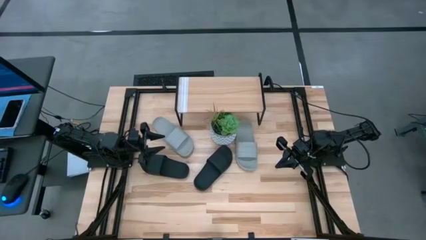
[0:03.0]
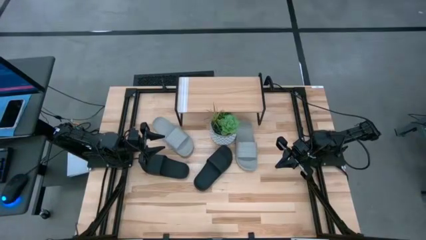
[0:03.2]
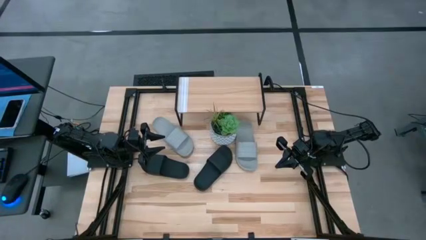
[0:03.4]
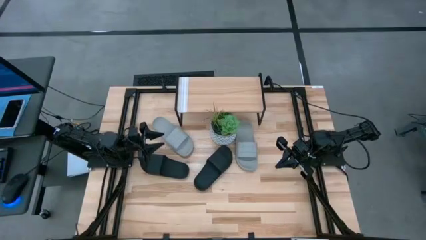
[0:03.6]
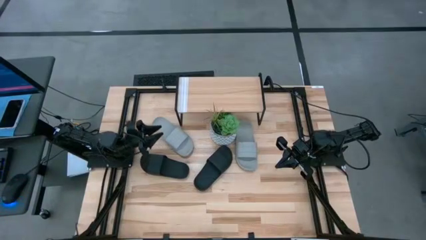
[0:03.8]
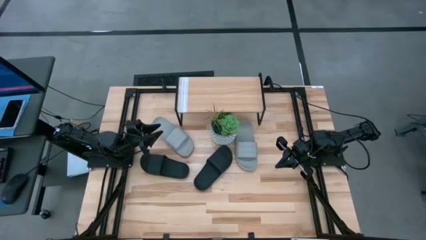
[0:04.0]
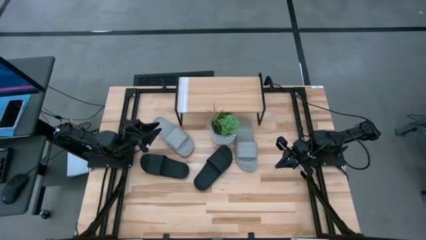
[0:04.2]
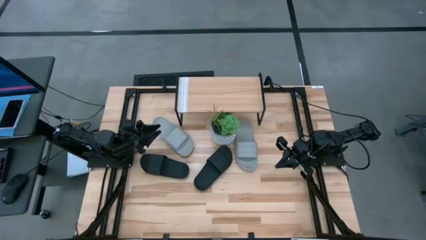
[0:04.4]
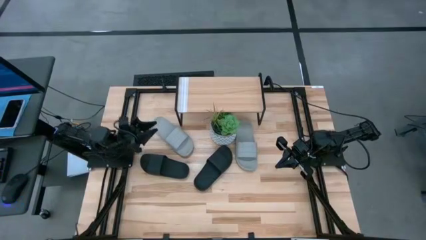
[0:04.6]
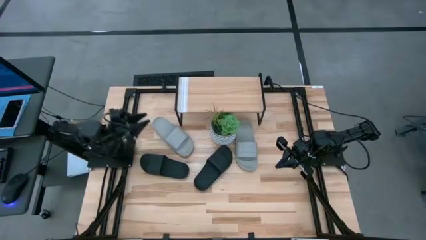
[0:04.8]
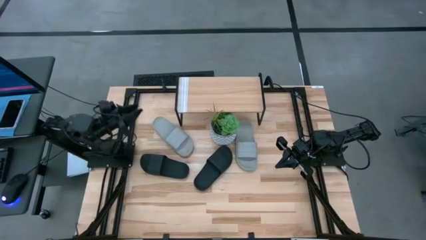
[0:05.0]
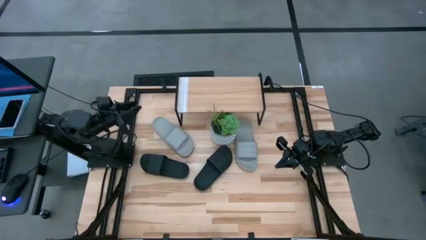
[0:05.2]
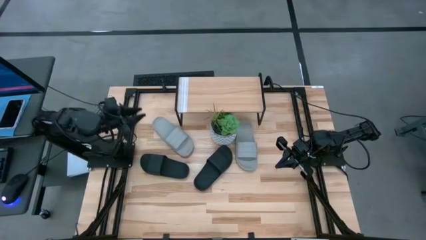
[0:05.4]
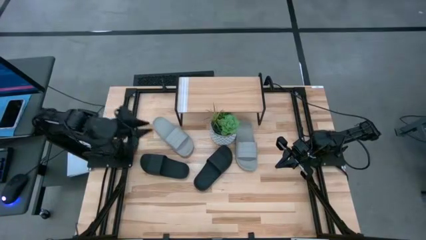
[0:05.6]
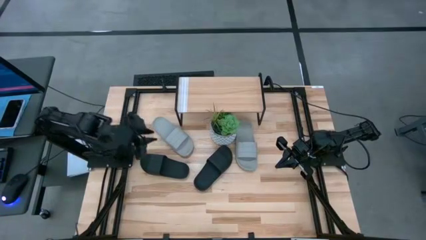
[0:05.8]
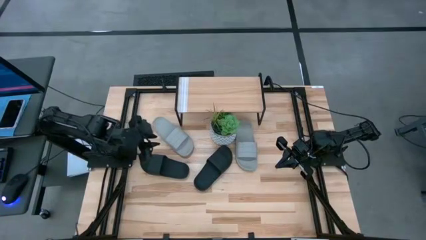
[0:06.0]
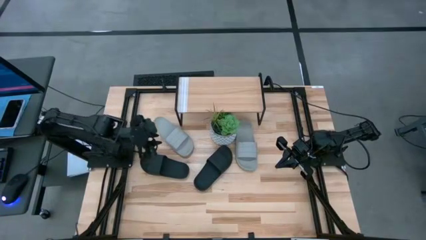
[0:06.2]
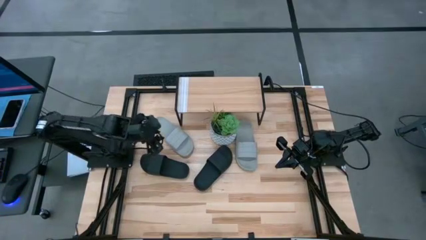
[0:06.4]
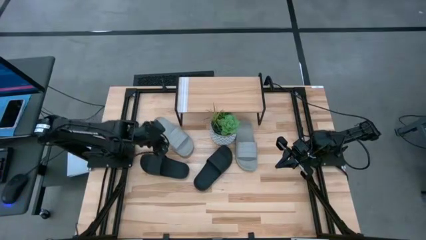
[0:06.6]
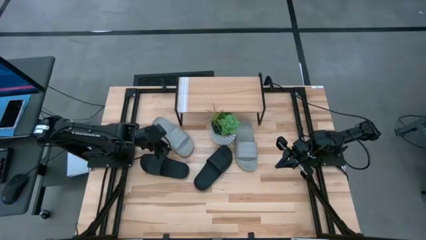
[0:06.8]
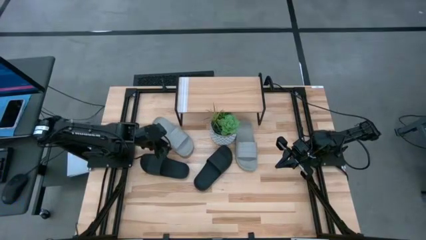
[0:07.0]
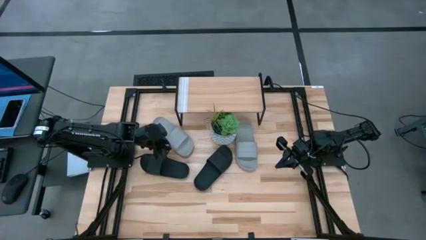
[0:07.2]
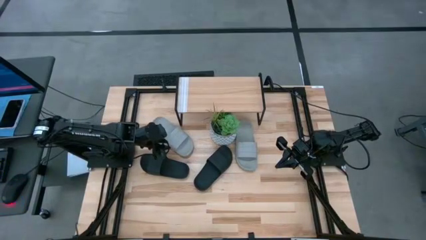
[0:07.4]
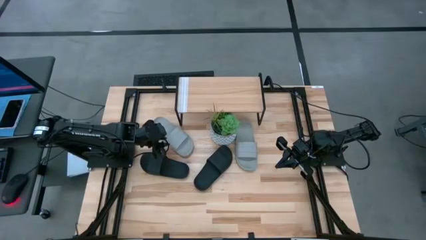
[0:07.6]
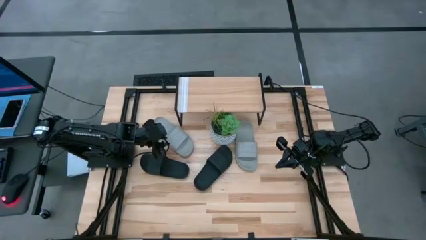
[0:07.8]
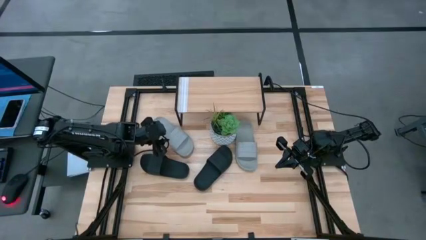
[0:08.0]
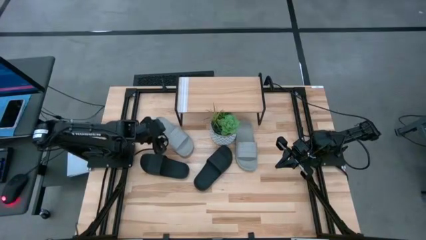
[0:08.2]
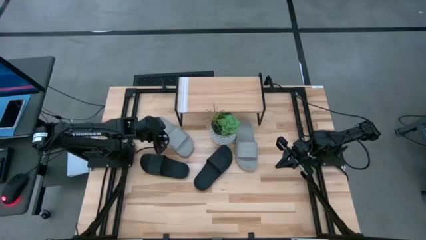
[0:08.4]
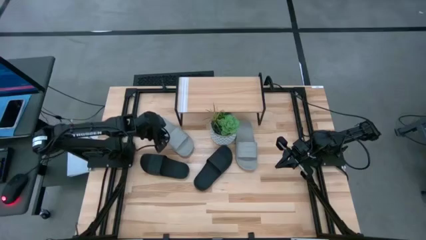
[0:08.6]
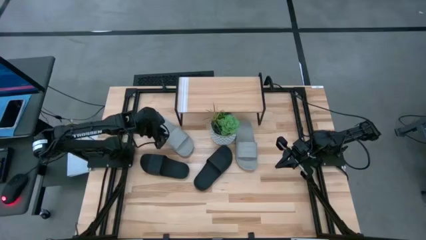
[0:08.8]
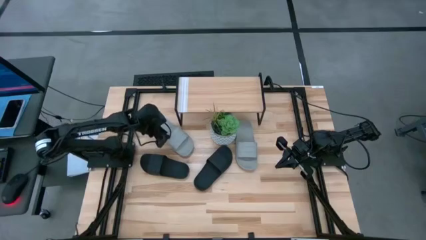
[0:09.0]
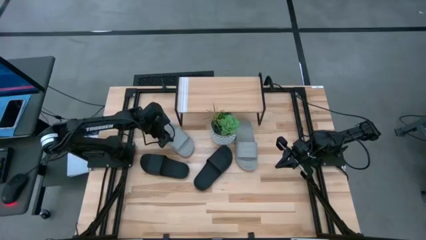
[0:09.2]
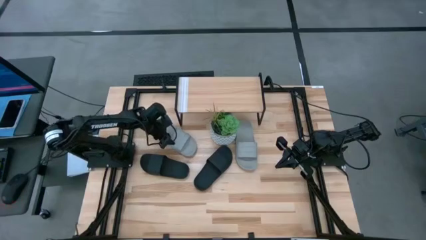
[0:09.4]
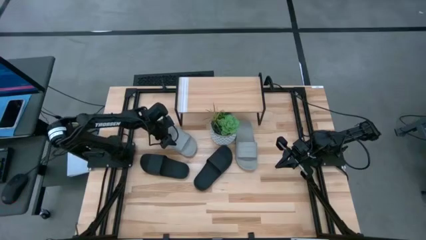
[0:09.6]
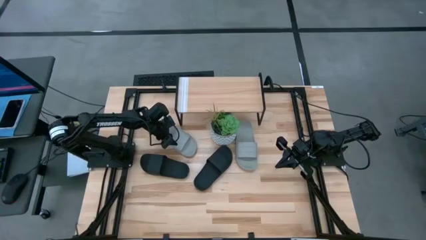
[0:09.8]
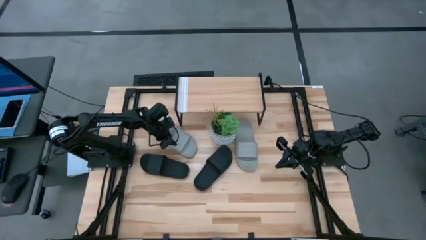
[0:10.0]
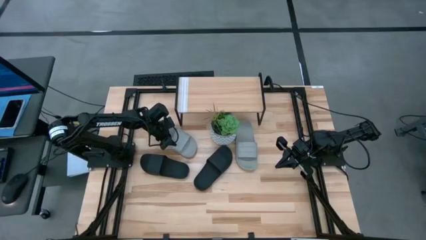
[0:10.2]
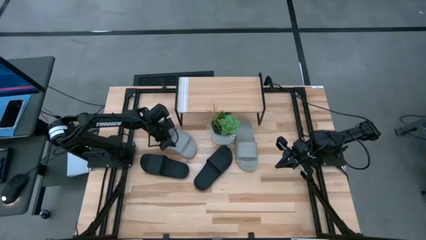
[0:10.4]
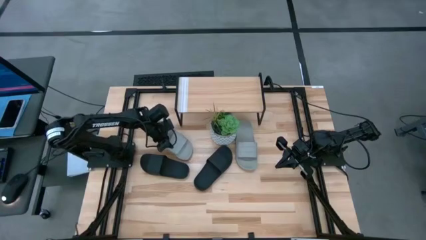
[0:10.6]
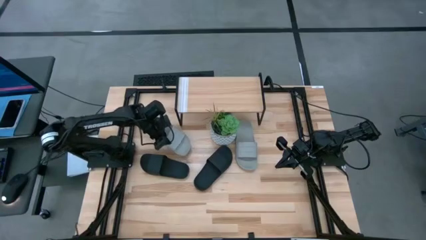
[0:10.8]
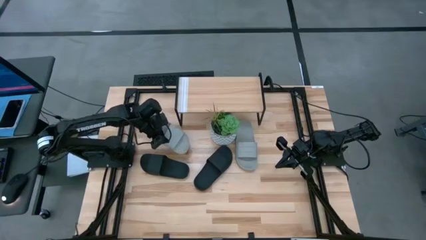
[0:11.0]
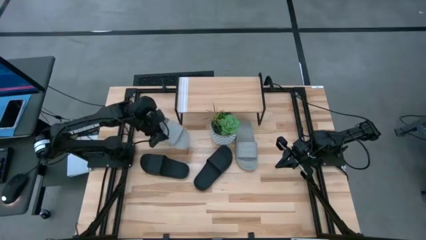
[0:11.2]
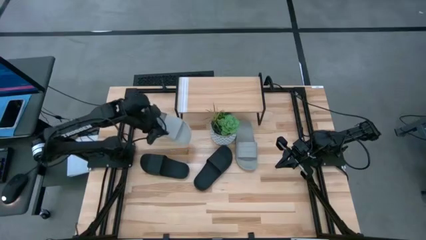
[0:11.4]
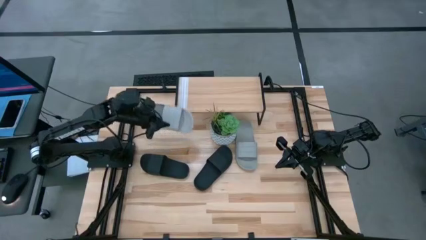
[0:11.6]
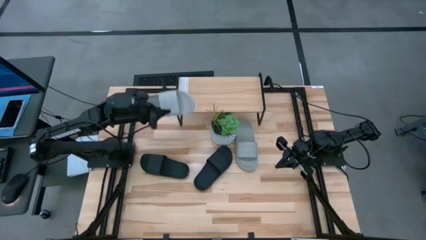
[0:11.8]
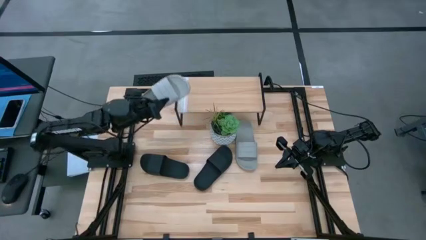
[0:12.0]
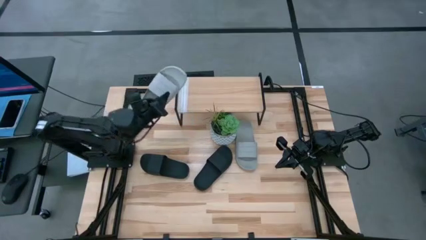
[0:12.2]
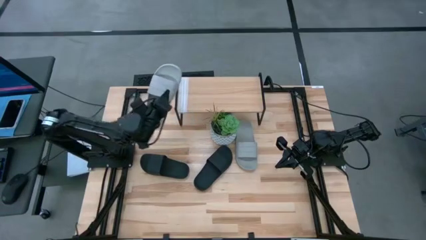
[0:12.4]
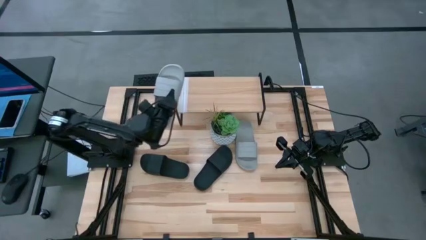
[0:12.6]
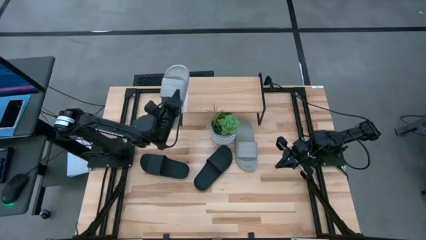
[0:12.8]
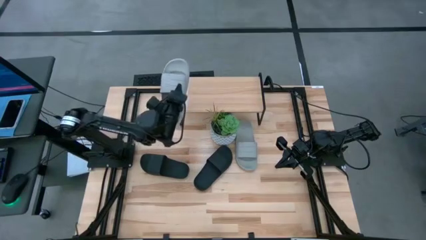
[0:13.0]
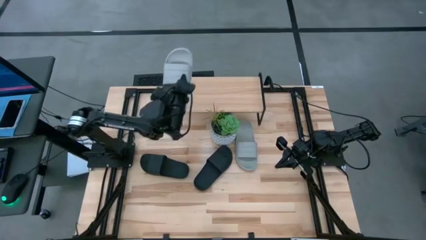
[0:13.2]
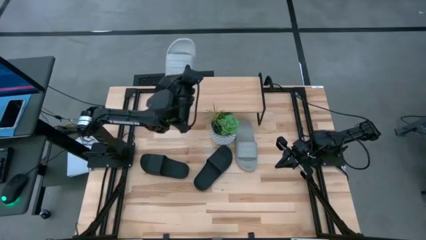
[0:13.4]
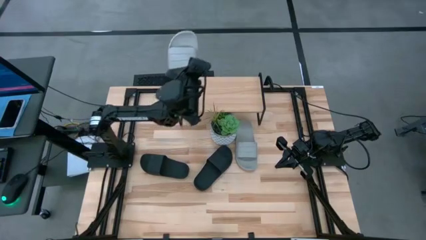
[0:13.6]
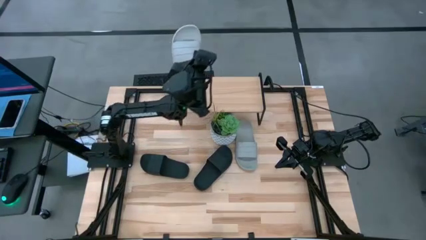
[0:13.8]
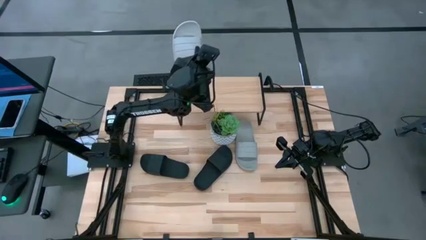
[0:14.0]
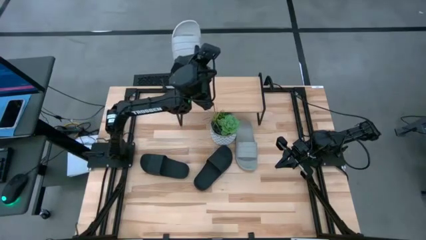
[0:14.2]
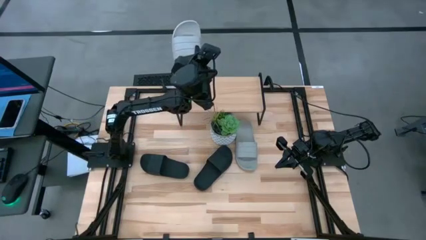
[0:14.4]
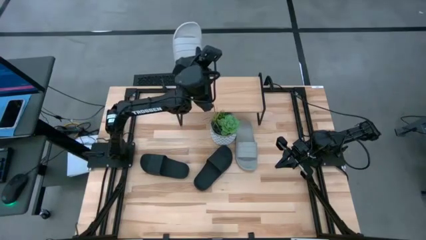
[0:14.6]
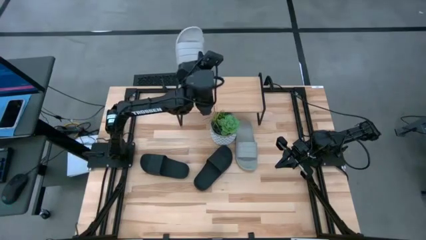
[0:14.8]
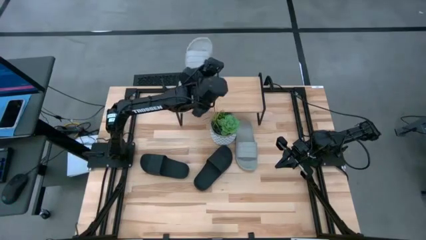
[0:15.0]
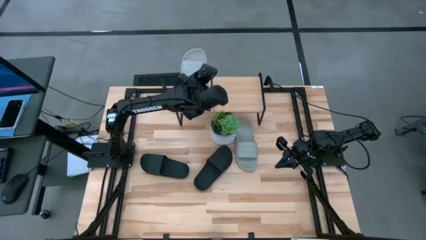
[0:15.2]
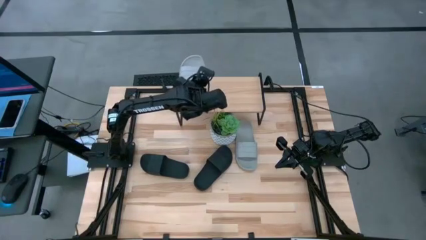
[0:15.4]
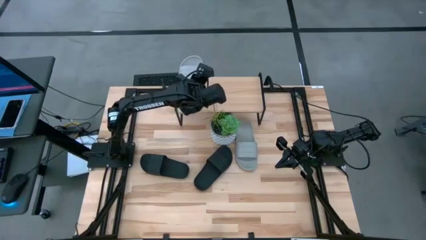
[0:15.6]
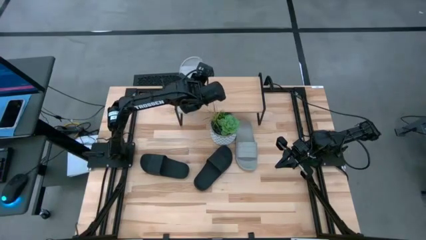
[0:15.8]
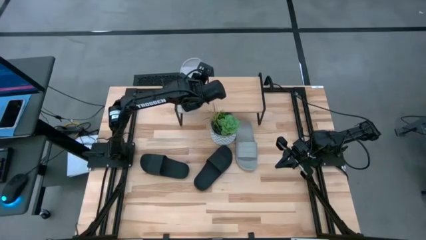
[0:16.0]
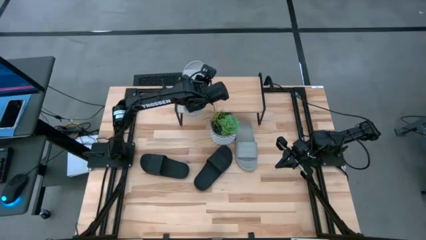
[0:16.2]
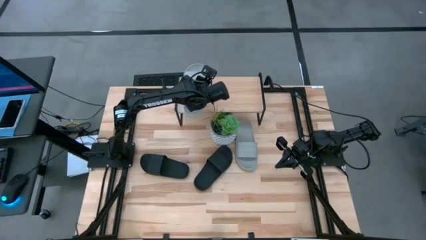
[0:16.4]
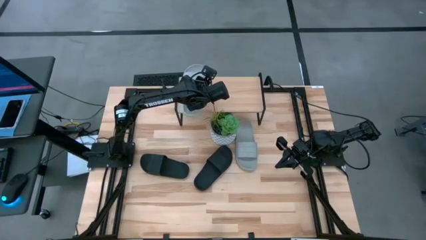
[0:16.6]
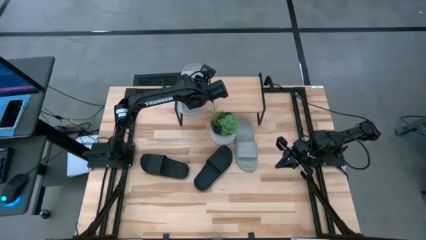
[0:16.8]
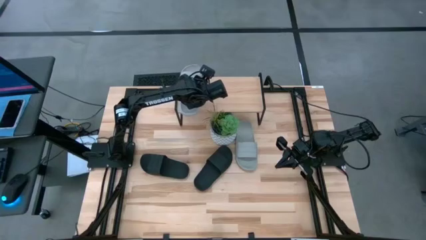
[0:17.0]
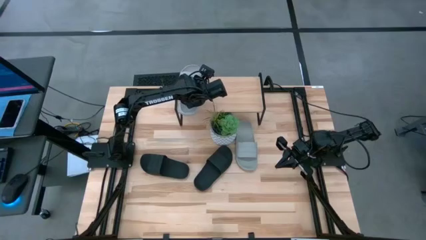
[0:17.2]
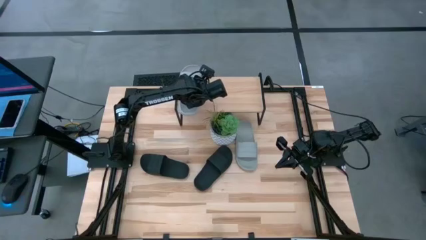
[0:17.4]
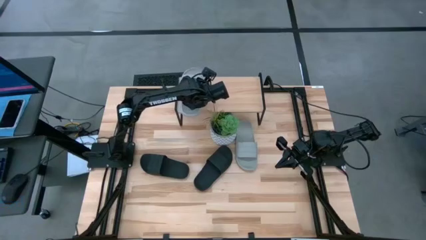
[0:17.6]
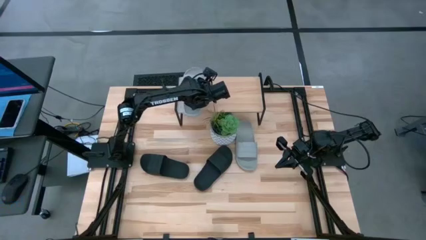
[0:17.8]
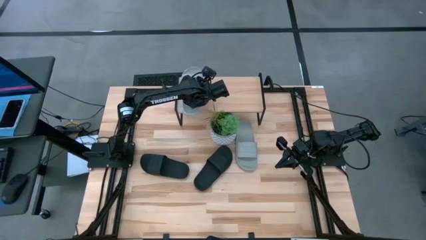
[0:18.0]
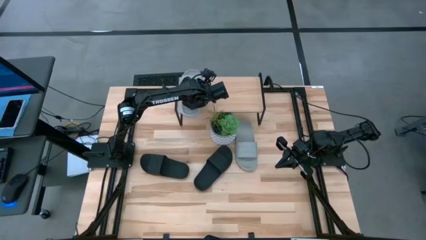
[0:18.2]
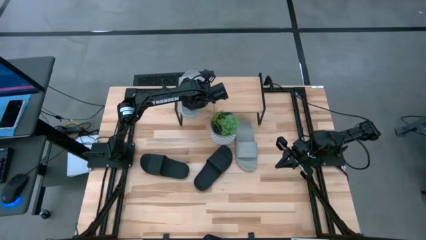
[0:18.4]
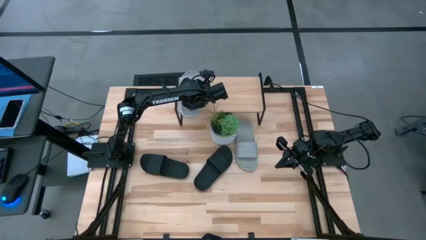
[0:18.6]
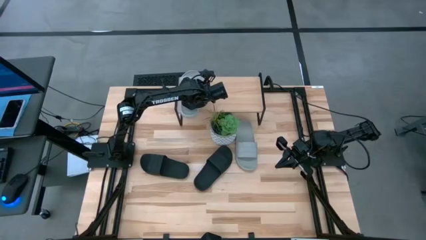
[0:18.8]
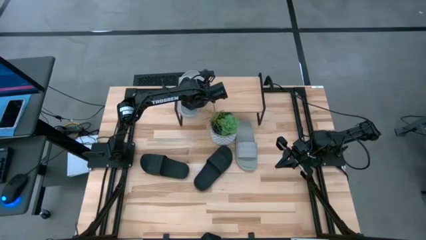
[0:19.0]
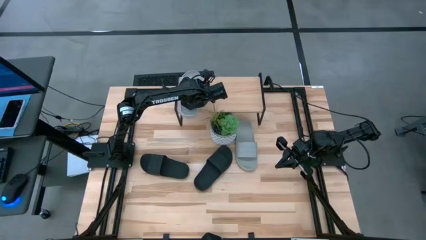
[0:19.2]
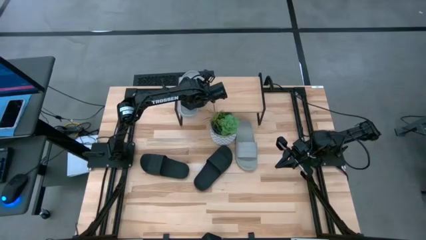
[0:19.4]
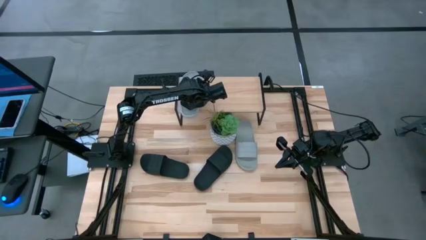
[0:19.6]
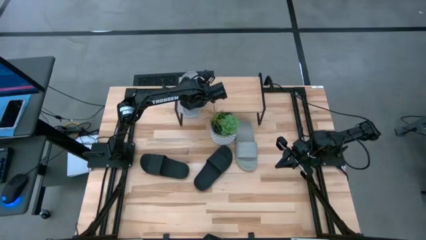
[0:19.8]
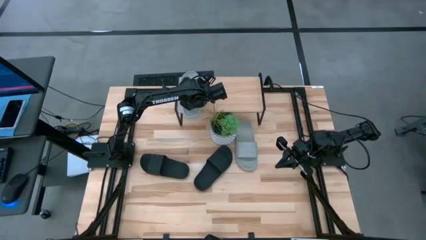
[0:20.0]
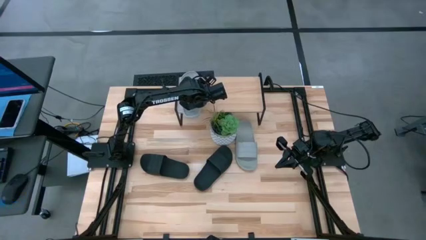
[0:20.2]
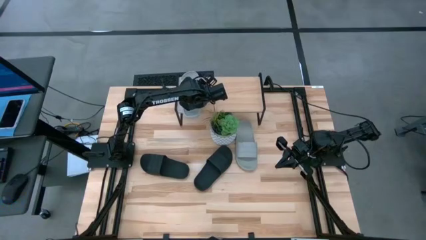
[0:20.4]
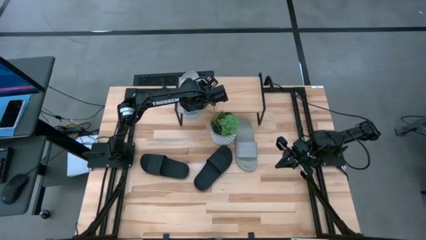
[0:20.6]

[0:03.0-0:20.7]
Task: Pick and place slides into the shelf
Put the left gray slide on the shelf
